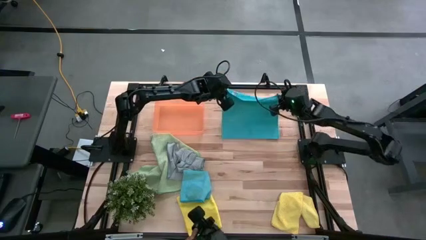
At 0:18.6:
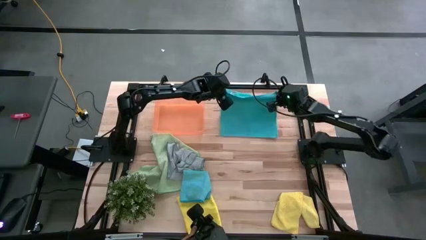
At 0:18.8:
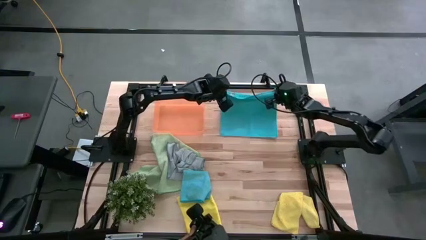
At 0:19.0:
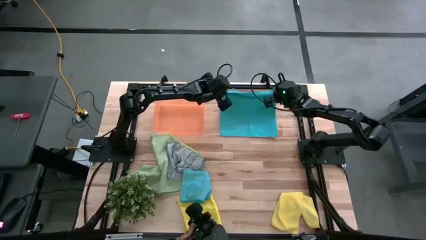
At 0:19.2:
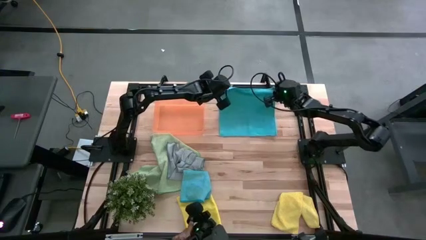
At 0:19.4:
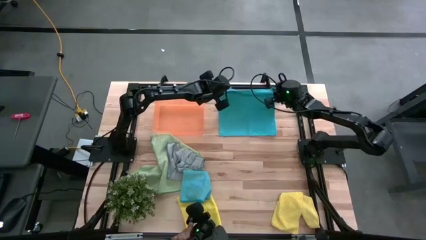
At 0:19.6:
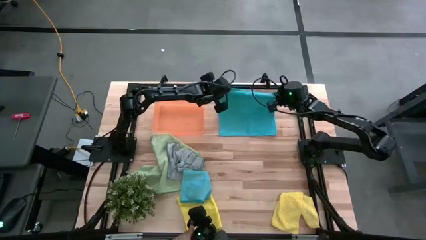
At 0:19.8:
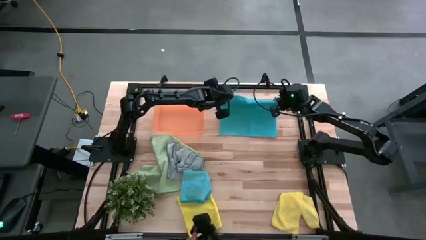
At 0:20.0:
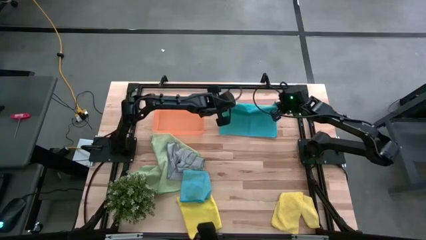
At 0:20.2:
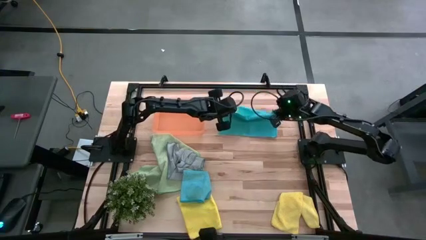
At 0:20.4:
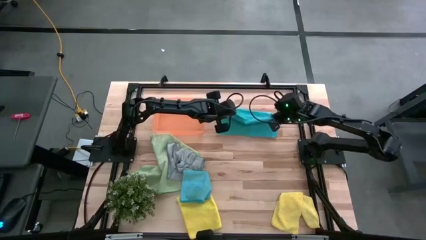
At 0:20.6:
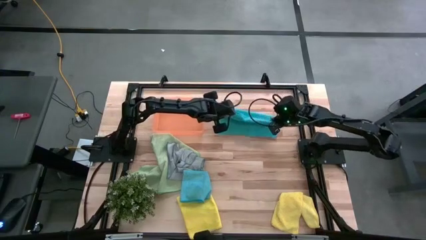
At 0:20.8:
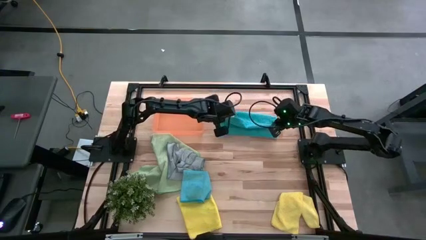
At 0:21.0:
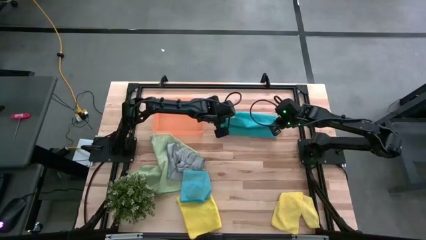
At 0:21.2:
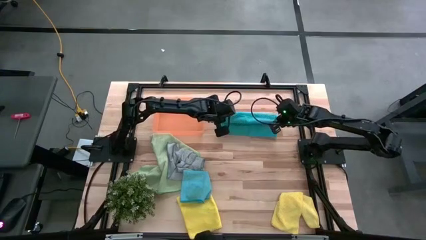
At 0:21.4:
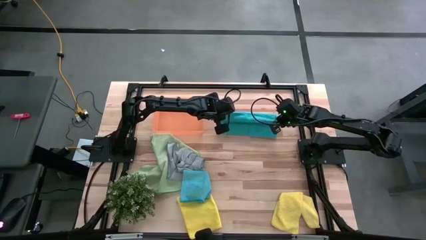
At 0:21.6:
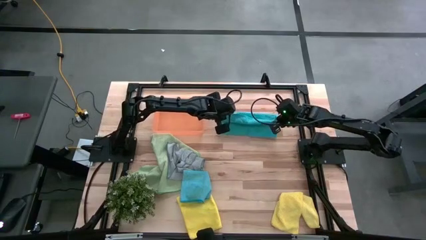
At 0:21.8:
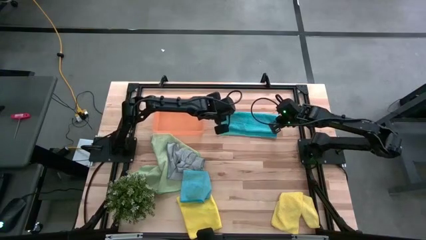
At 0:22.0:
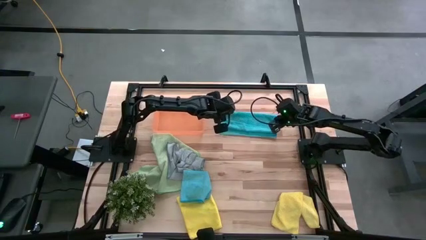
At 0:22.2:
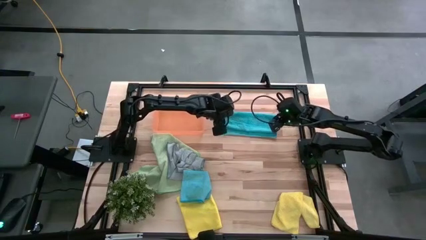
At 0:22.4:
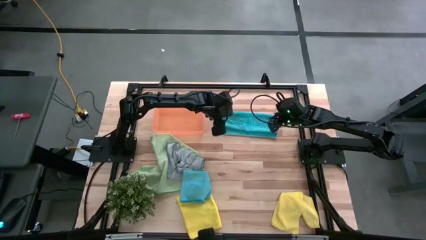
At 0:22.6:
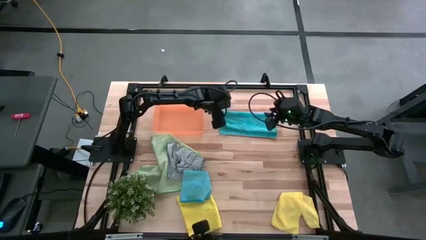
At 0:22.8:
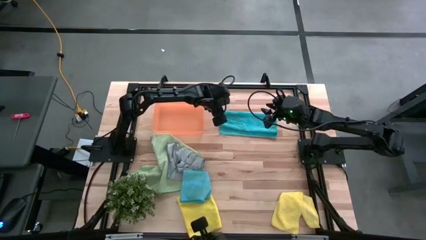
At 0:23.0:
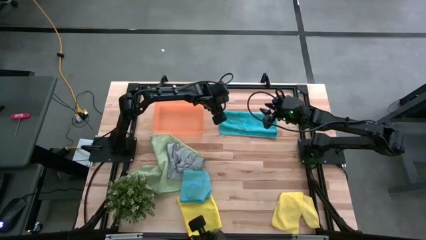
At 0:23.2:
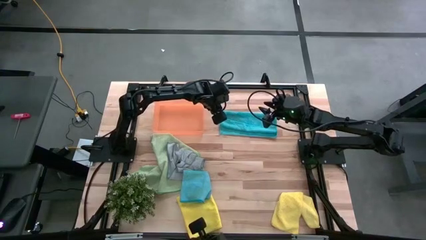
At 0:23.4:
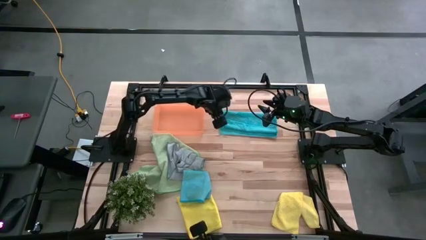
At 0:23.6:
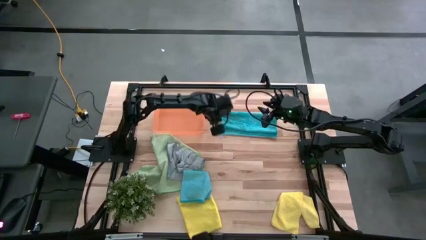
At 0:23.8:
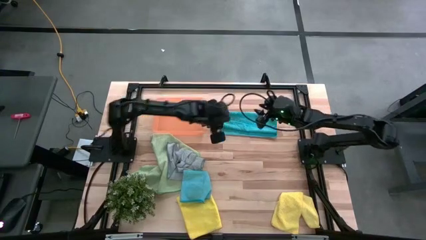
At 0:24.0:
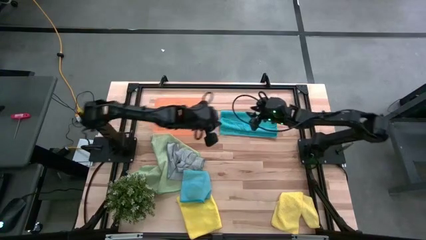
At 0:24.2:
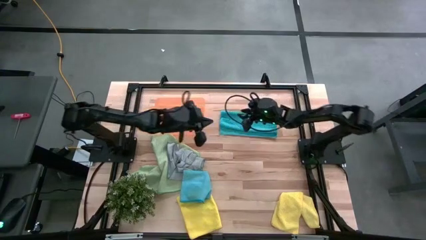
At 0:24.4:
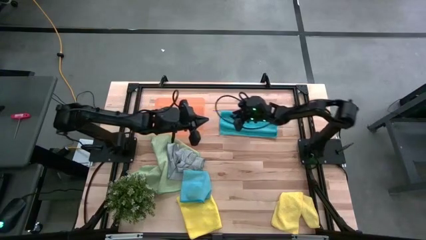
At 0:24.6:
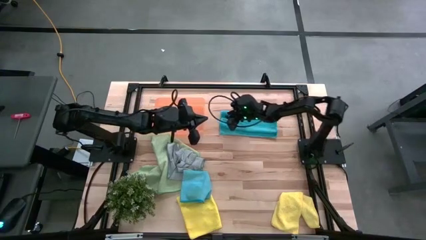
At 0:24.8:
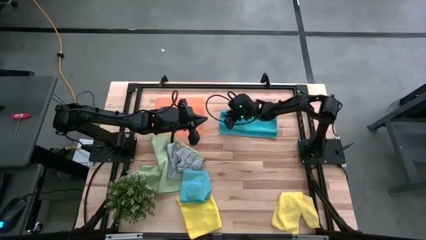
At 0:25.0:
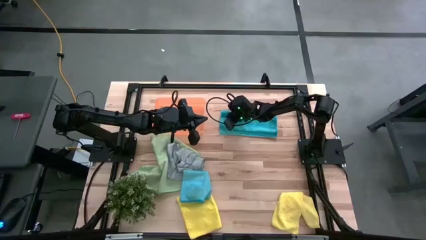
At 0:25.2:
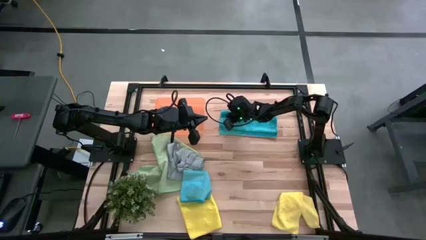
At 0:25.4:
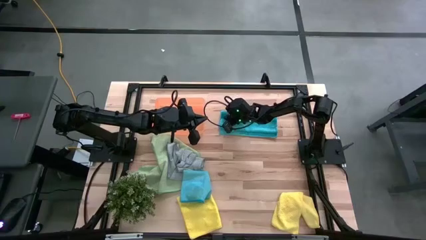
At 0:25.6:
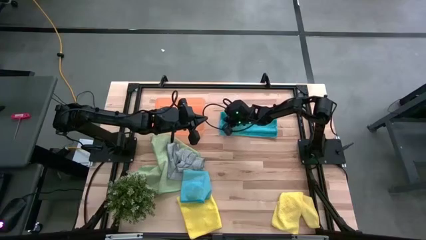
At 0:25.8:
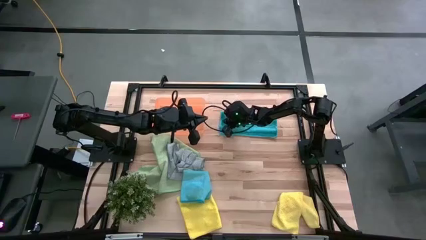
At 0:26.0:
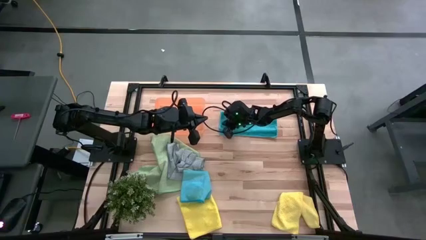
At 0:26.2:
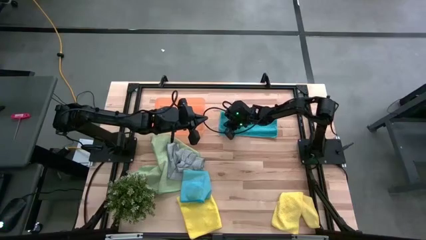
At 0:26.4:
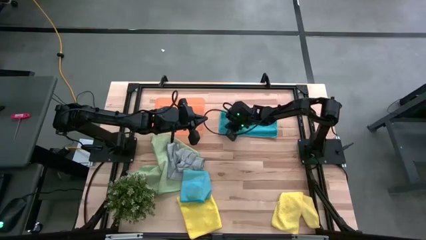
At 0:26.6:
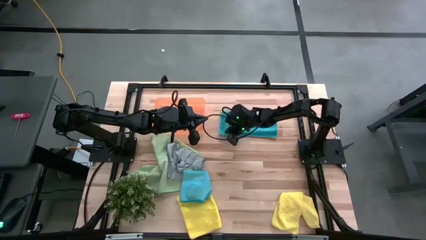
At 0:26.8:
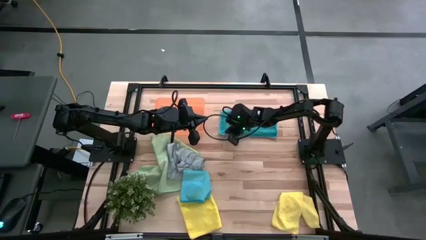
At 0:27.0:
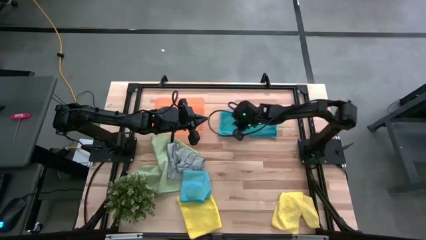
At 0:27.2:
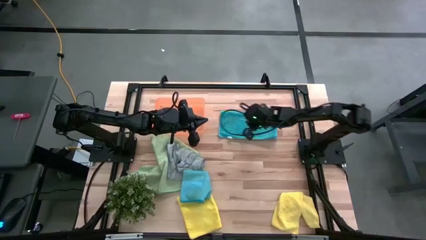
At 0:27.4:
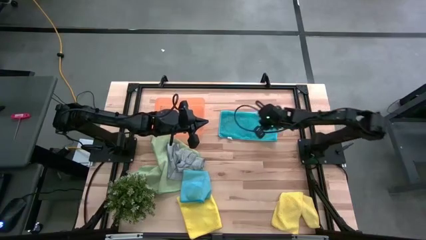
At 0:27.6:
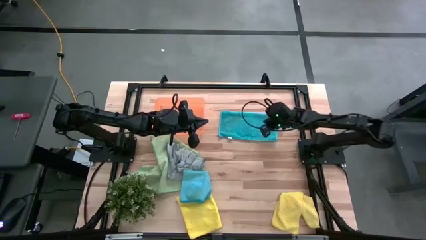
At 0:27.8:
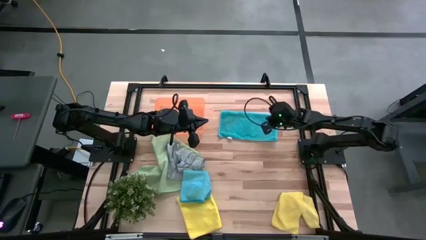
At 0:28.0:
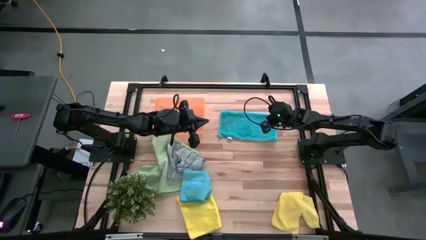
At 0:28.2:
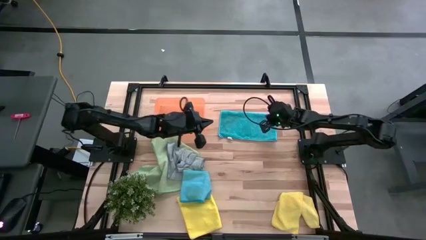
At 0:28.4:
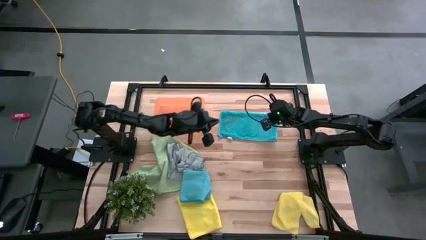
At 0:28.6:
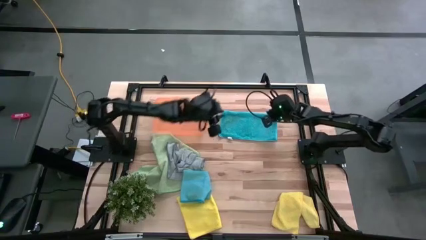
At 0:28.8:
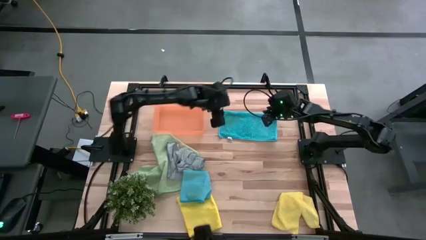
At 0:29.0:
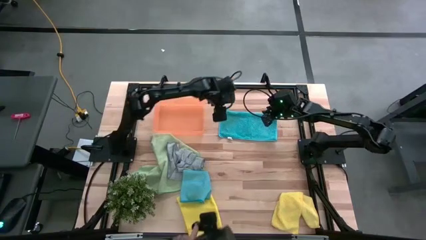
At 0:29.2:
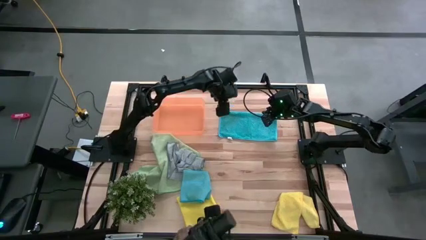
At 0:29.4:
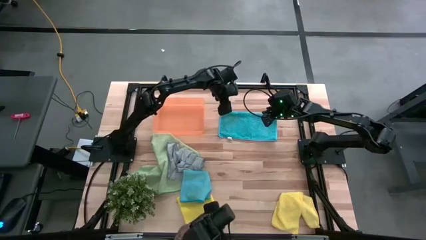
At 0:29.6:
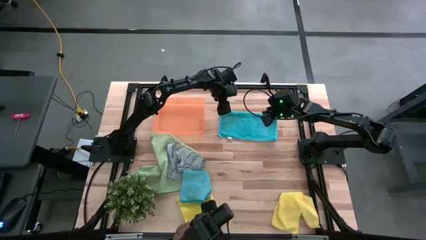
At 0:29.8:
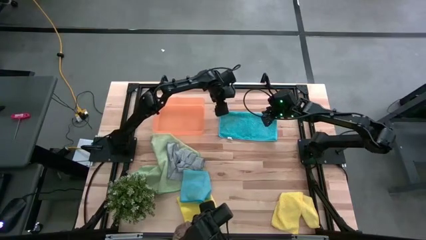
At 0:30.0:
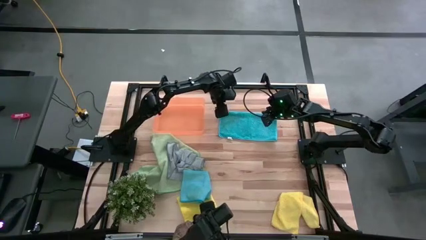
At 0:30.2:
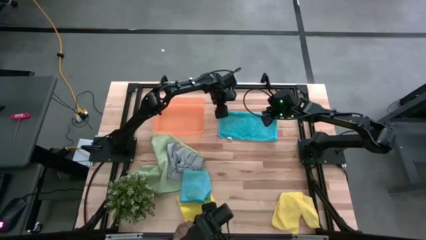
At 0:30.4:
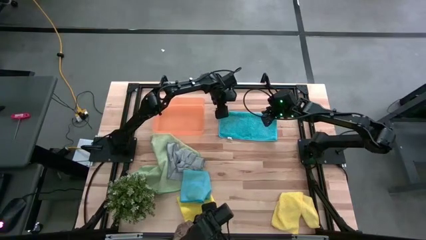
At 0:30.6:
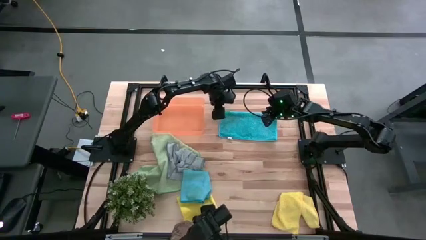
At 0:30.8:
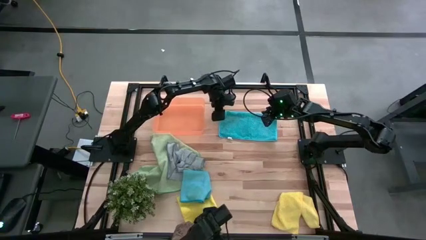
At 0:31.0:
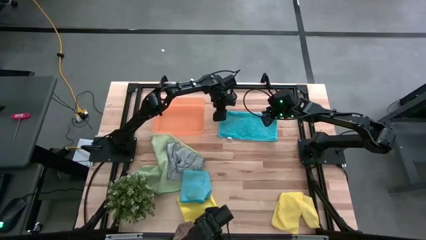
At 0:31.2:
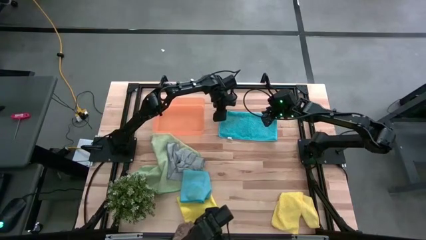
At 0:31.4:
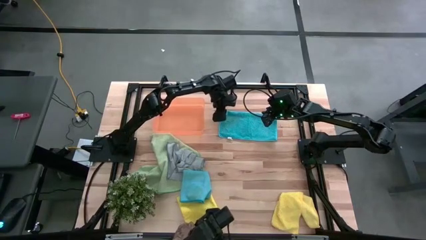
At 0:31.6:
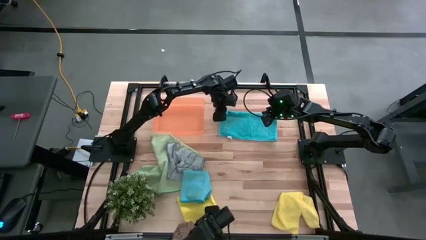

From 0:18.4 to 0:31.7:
Task: Fold microfiber towels
Fold the top blue microfiber cloth
